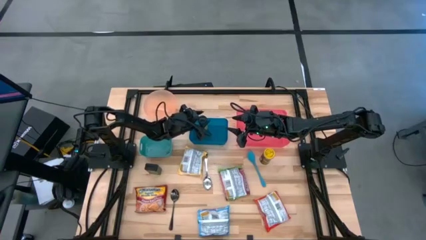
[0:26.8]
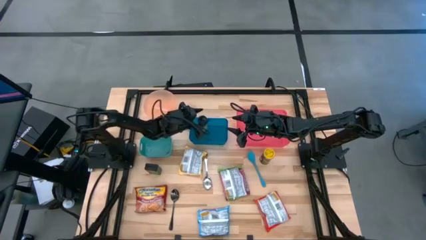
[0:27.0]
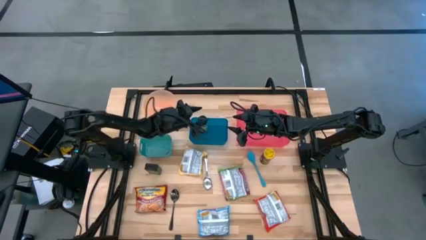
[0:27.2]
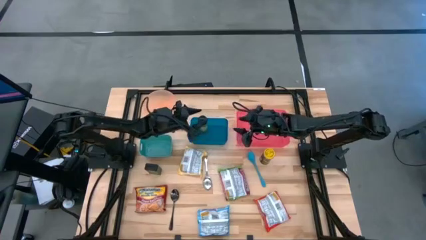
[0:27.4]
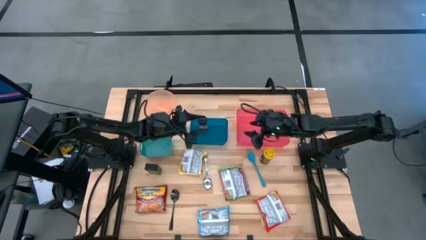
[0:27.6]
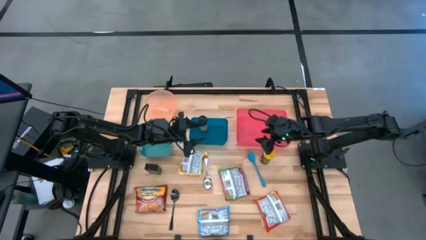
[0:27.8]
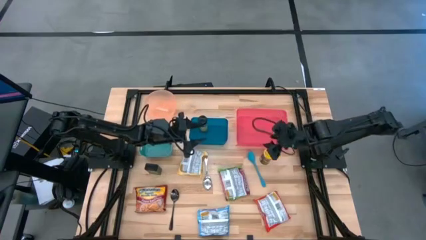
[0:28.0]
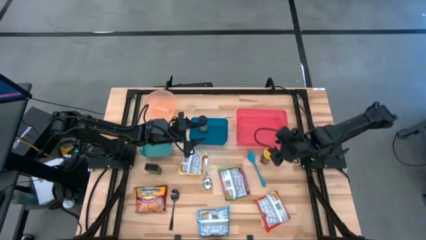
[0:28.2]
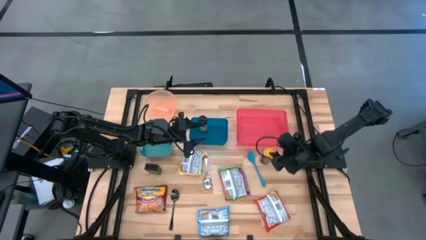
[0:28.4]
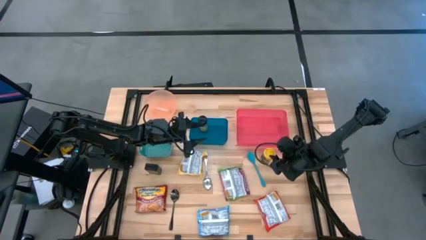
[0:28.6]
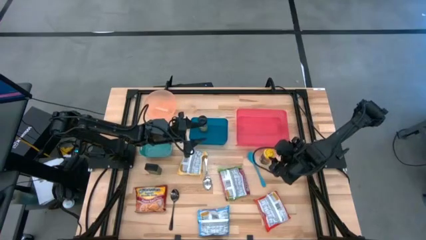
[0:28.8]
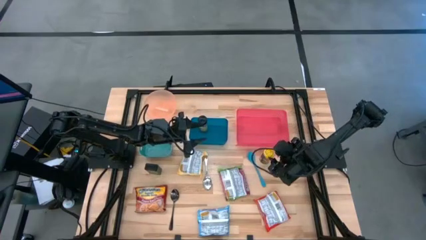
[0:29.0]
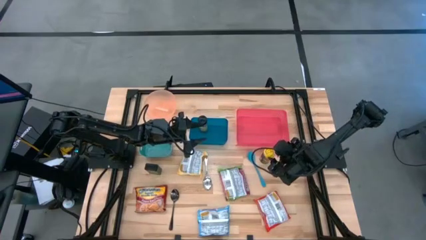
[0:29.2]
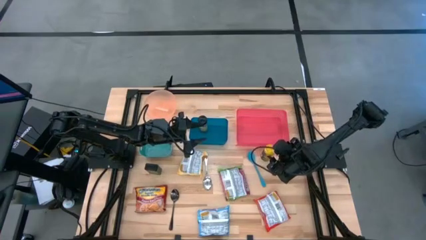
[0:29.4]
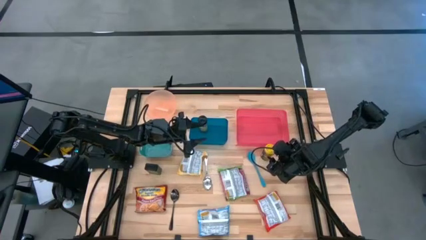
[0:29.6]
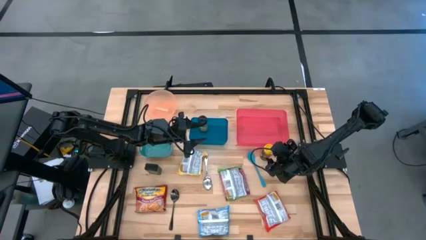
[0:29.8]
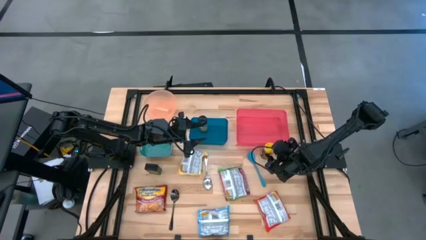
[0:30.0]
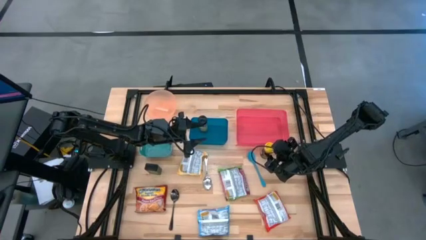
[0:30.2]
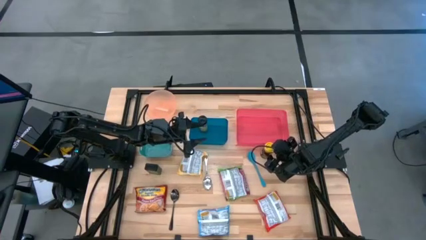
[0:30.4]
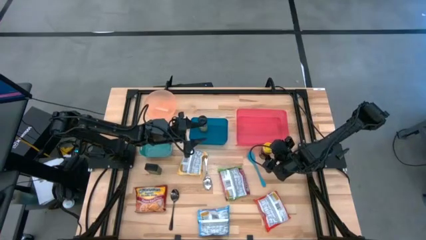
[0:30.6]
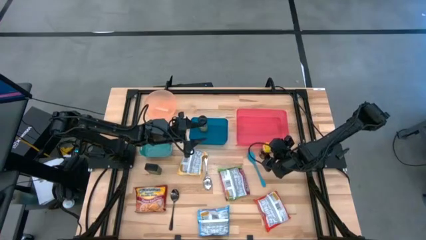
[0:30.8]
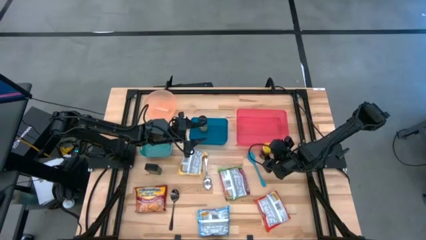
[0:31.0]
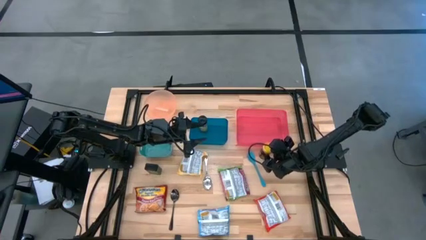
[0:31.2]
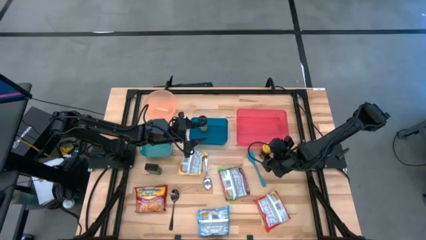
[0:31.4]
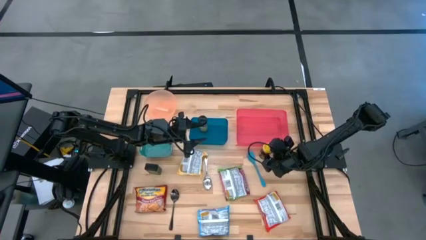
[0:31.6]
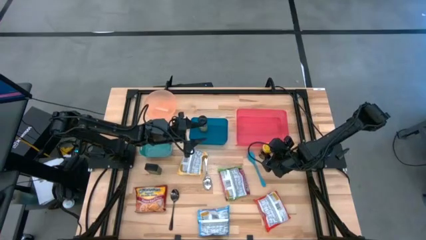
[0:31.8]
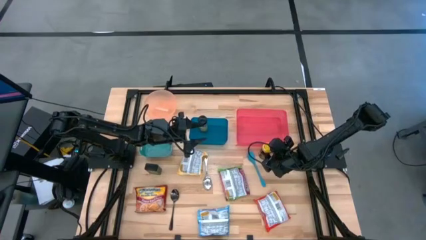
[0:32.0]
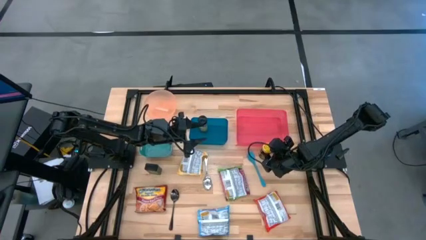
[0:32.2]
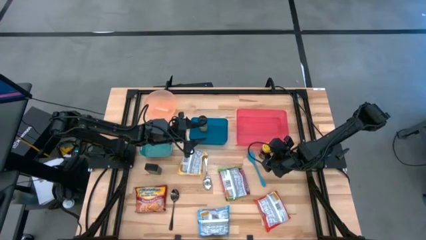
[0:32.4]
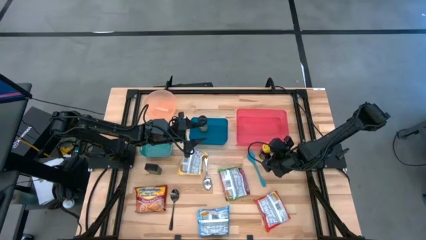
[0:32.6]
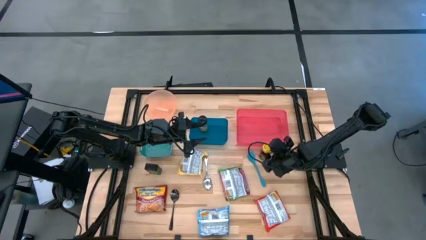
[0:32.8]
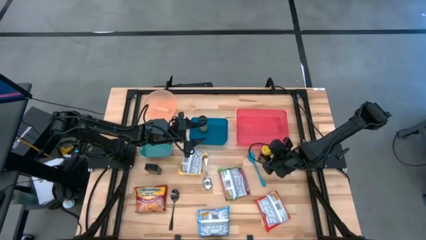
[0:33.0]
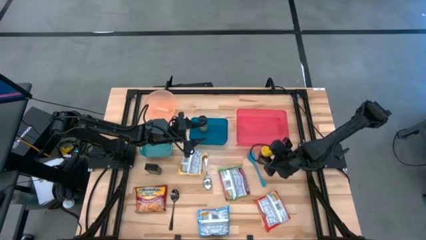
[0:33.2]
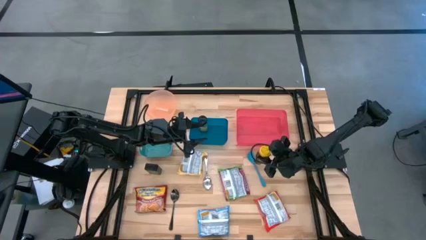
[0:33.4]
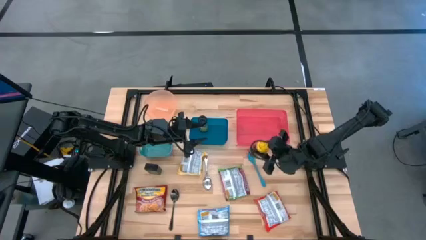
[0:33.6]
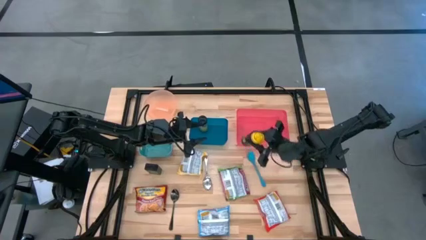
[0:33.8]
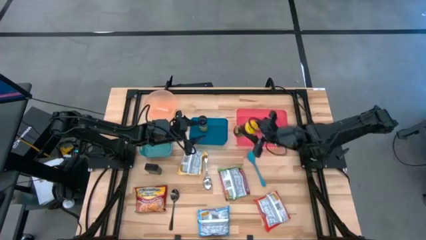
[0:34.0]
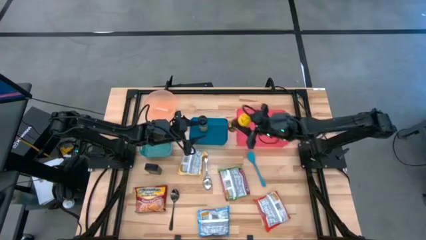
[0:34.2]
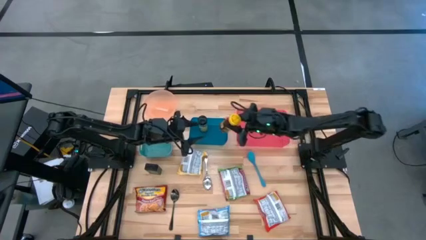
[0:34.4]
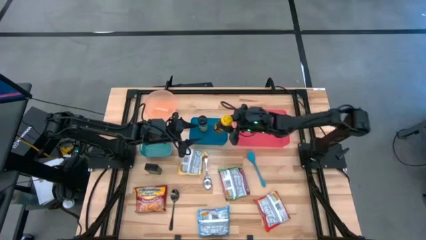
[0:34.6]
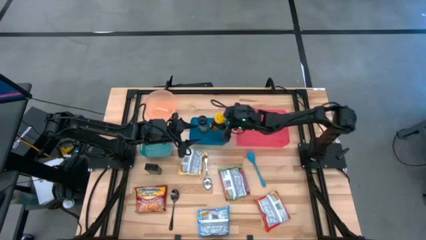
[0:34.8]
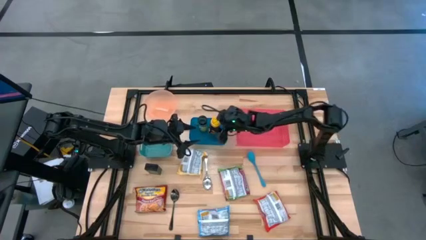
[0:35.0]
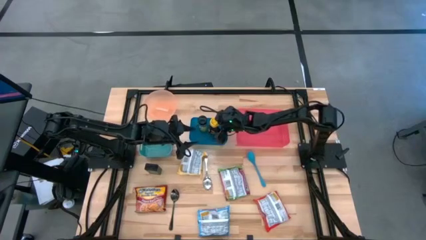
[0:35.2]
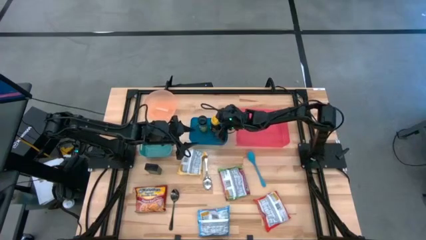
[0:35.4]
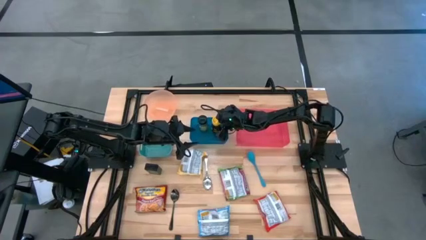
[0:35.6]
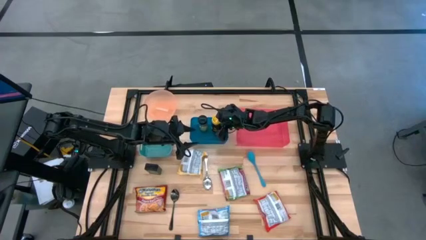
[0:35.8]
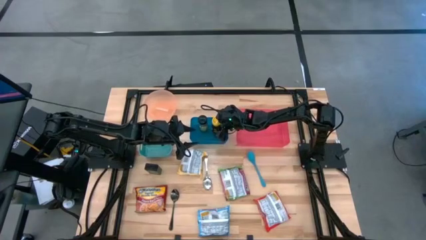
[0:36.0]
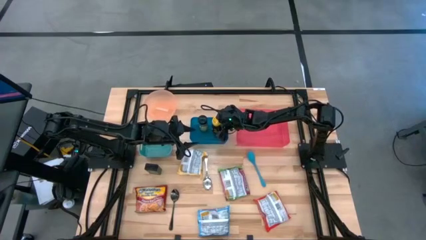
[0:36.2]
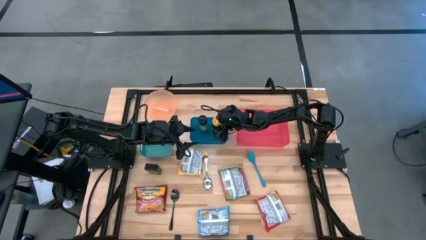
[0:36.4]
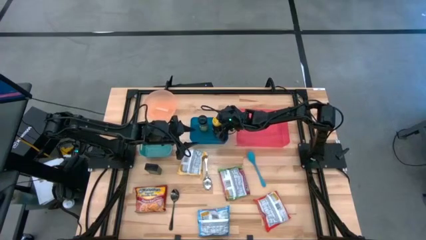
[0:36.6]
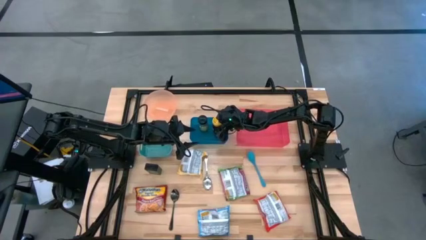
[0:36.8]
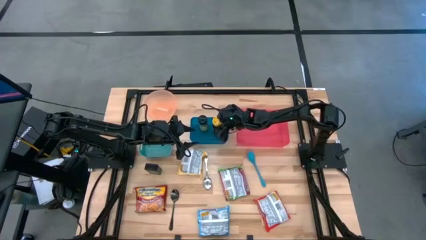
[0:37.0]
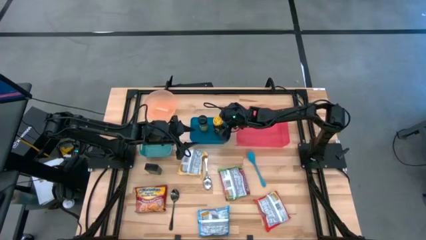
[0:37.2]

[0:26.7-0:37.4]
Task: Pick & Place Food Item
Put the yellow seasoning bottle into the blue bin

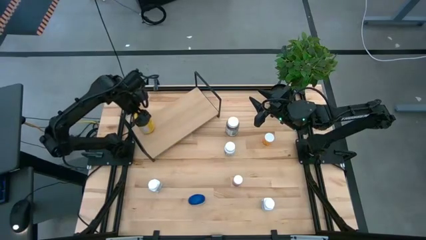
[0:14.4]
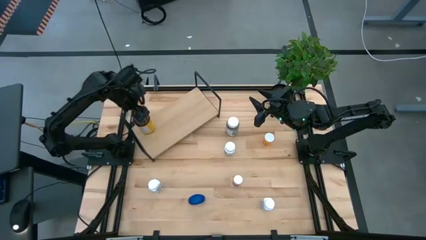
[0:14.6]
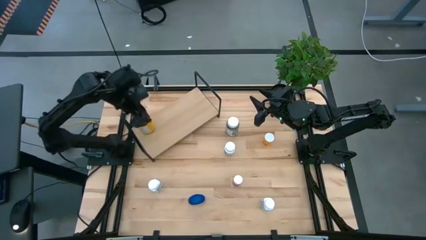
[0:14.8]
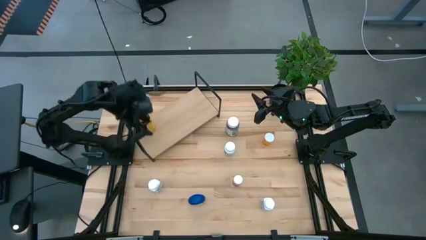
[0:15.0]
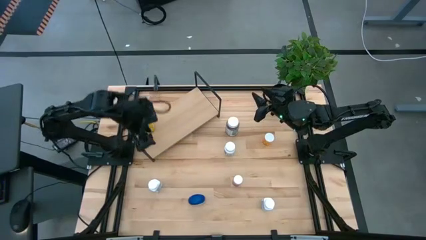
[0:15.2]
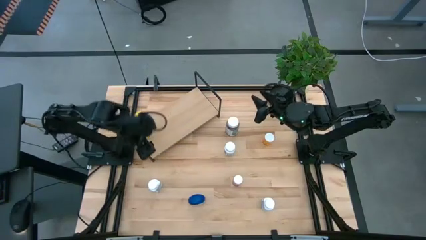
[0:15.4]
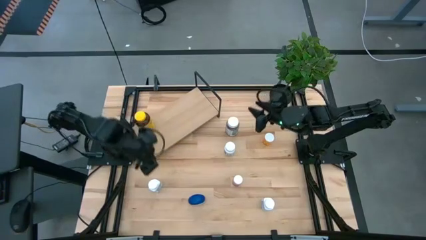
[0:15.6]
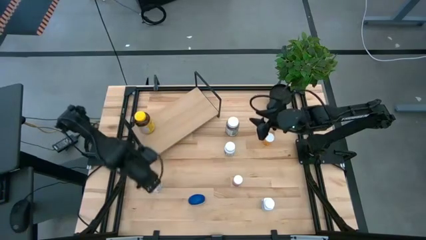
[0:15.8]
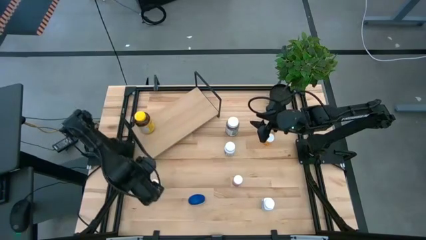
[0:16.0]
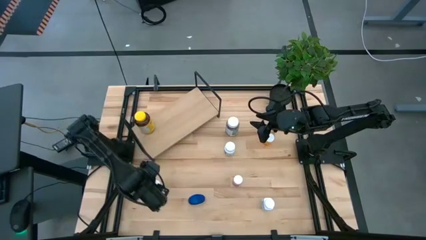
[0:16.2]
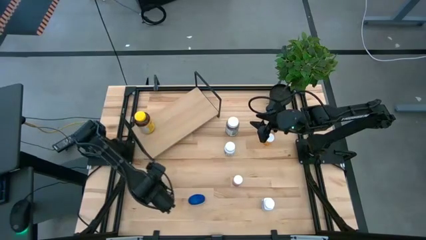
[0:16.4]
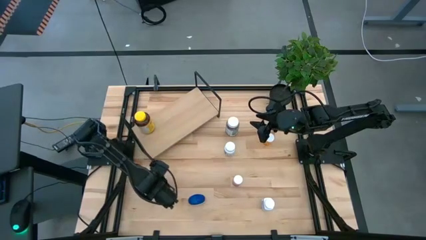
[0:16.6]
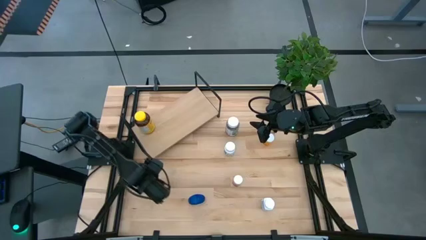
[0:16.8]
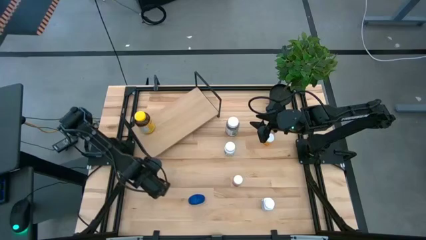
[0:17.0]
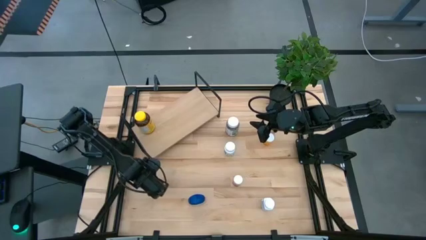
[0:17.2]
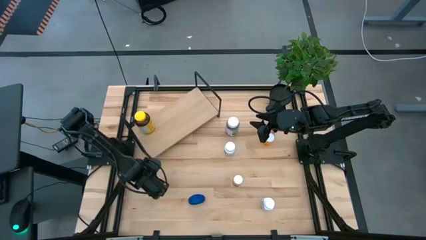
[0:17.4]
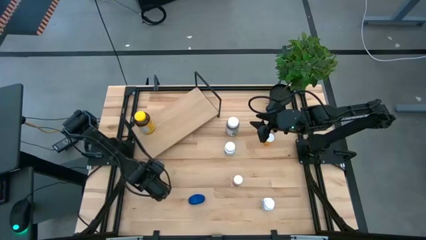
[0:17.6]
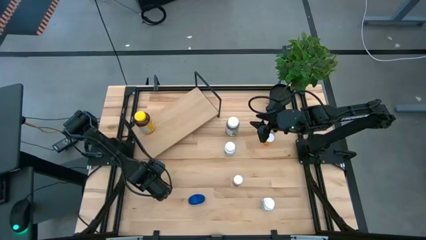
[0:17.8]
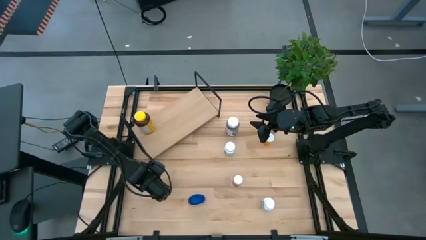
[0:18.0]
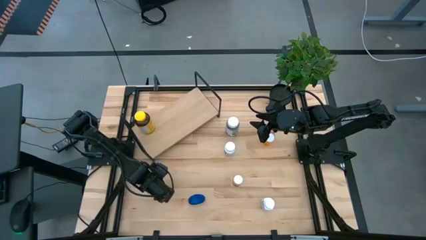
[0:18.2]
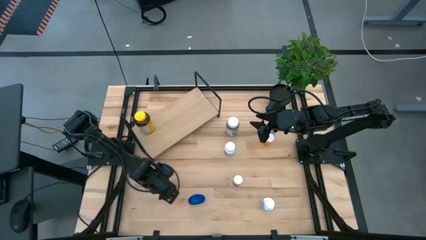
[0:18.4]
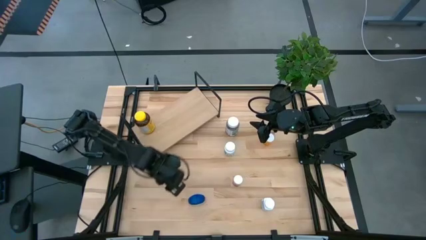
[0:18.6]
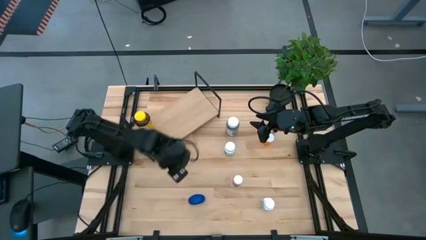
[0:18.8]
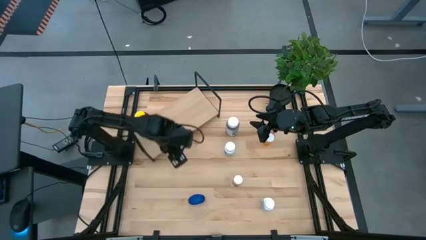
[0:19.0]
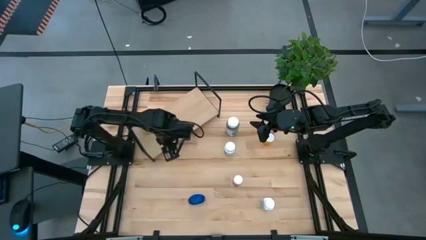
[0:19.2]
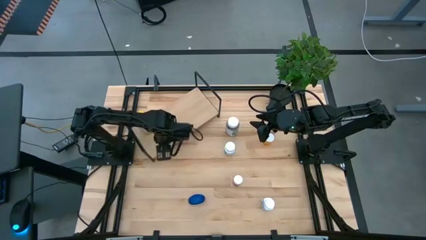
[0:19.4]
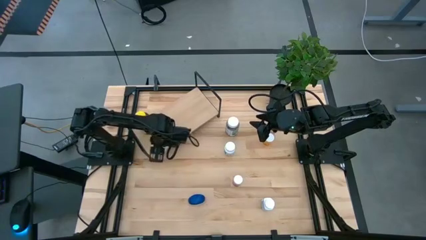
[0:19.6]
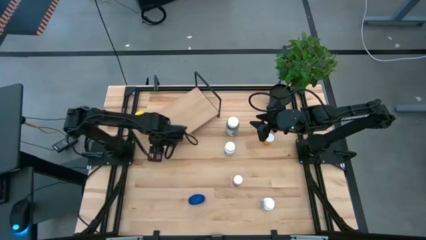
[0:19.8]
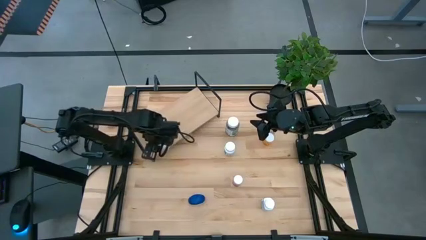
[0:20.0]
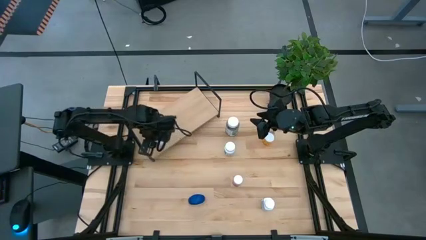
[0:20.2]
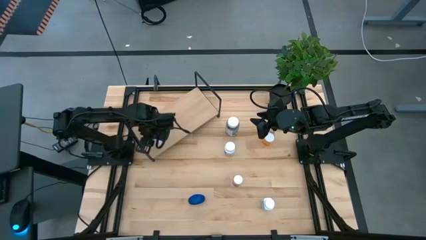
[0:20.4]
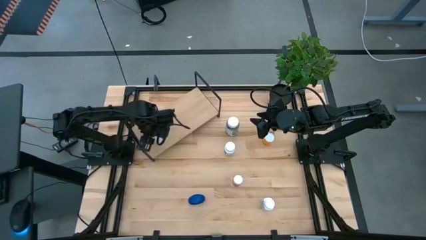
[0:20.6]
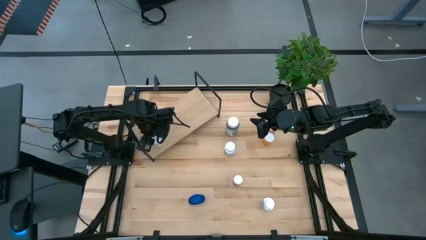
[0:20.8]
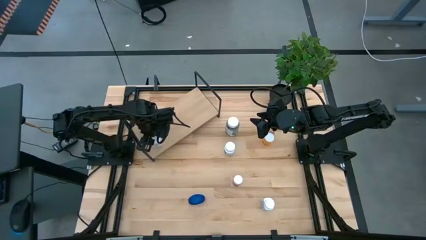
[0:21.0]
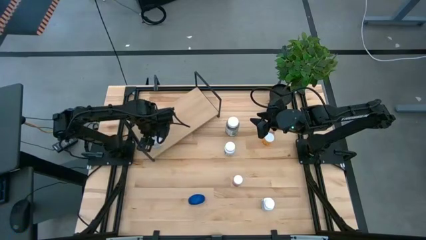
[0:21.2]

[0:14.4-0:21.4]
Task: Pick and place medicine bottles onto shelf by color
Put the top light blue medicine bottle on the shelf
